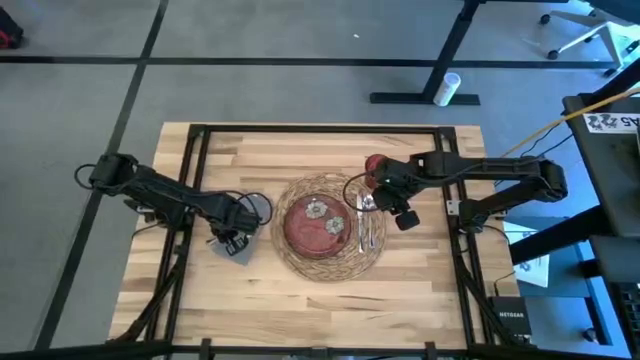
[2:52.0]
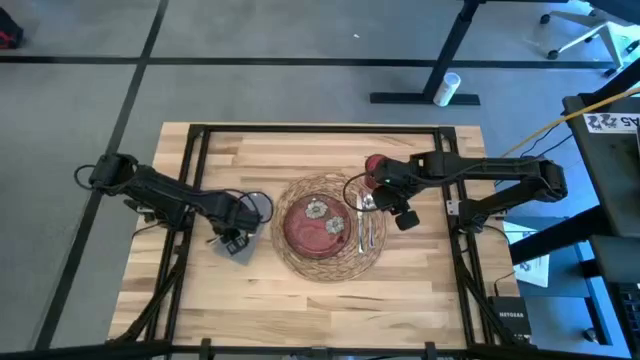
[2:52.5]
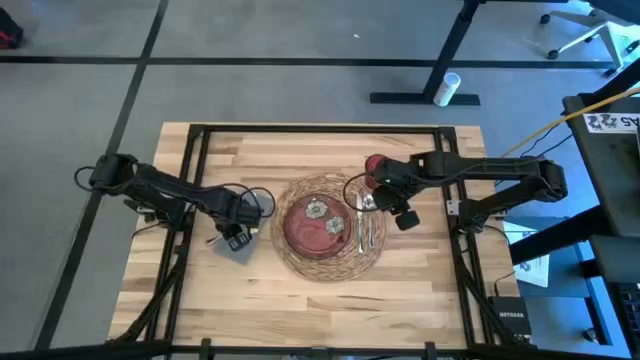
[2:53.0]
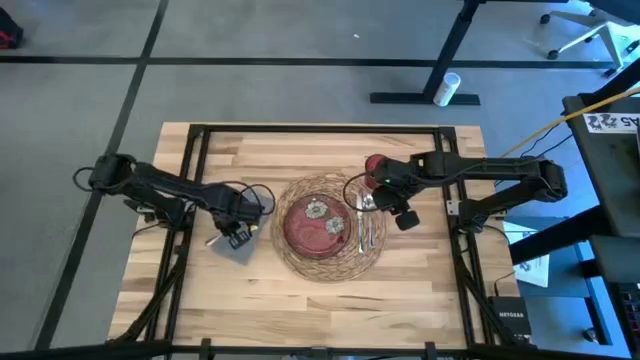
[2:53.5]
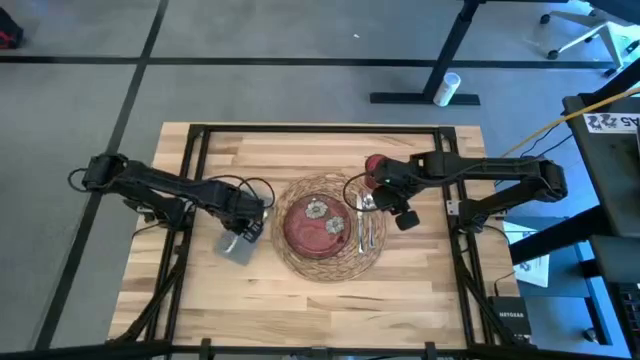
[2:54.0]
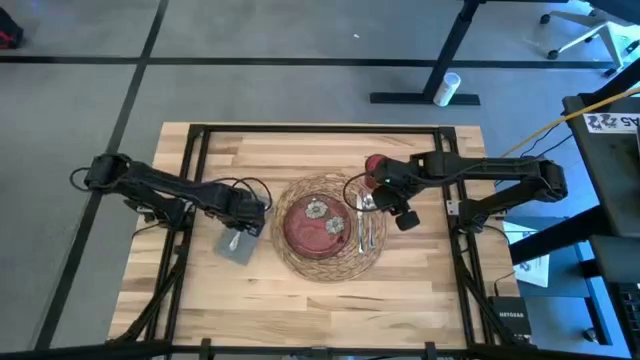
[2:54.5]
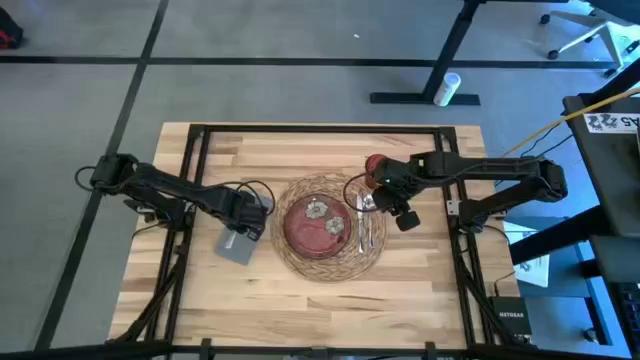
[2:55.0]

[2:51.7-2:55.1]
Task: Set table place
Adjust the silver spoon on the gray table napkin

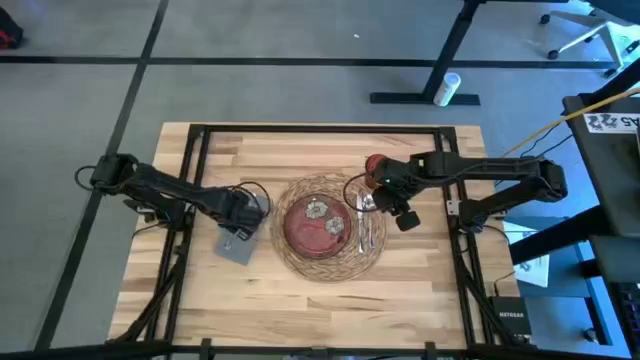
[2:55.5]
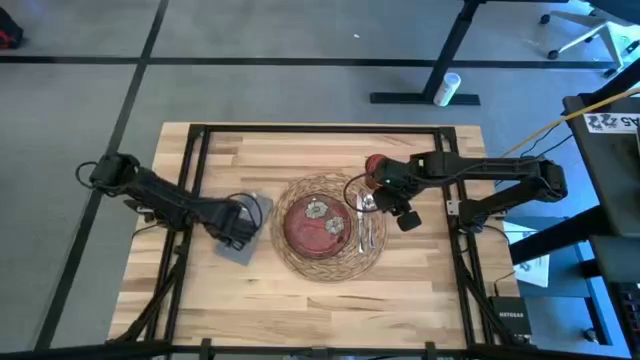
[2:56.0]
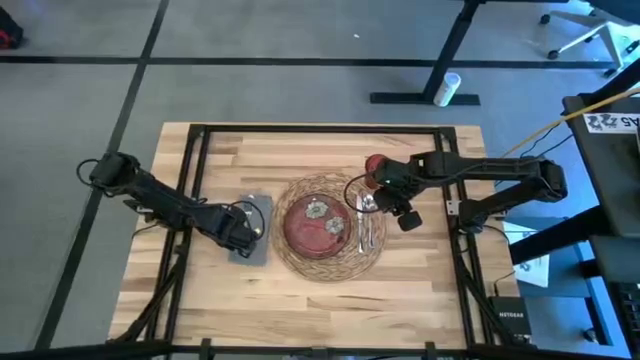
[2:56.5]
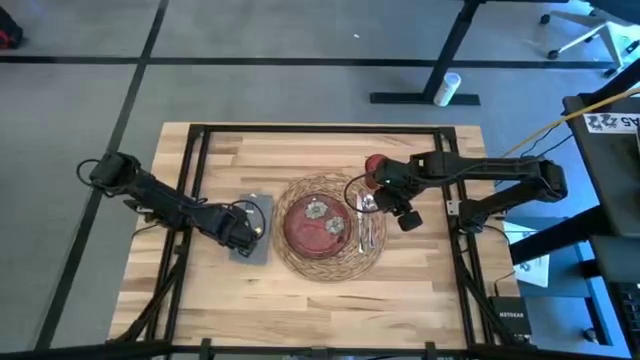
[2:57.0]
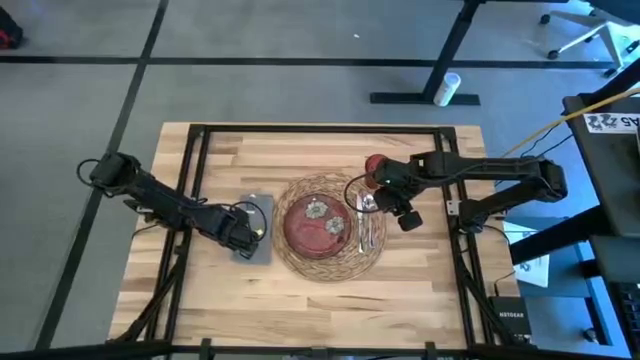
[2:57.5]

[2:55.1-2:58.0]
Adjust the gray table napkin

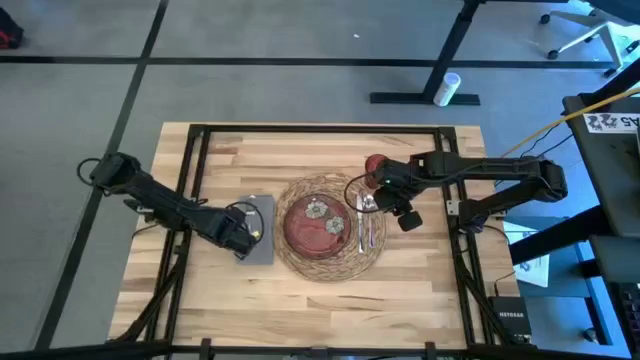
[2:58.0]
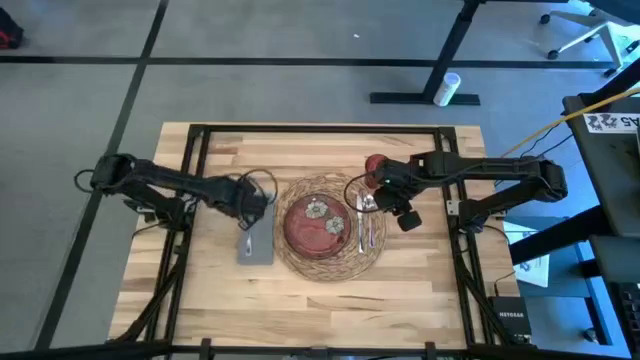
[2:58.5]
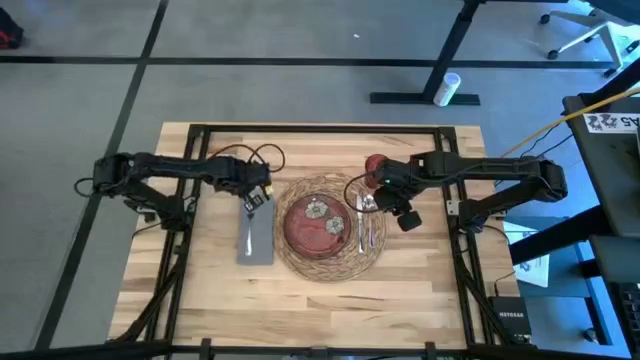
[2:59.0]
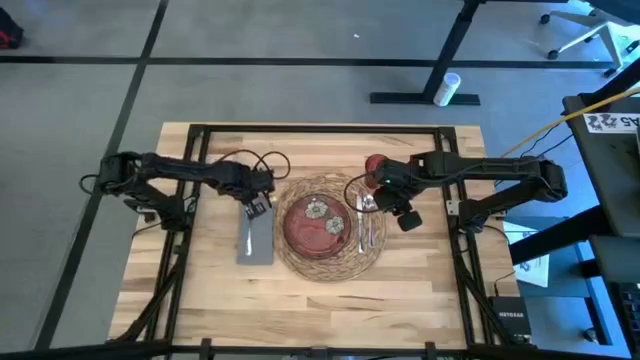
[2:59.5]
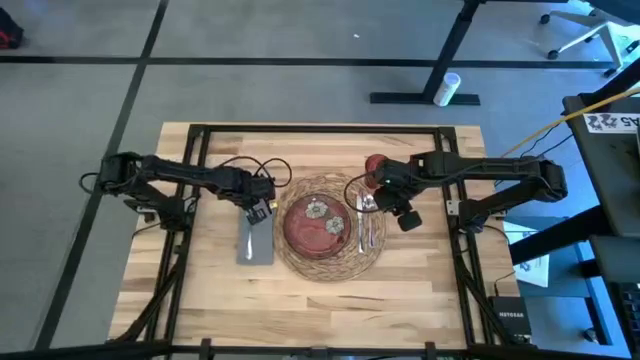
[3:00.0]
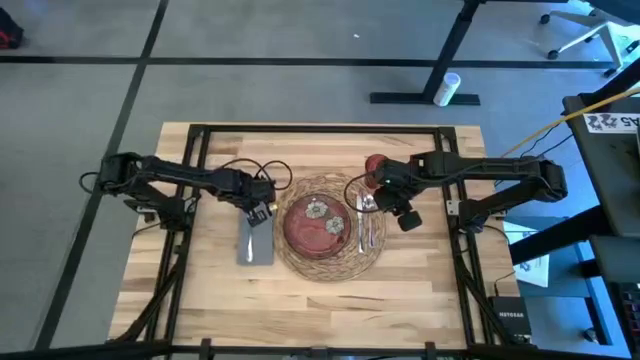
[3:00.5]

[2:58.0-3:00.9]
Adjust the silver fork on the gray table napkin

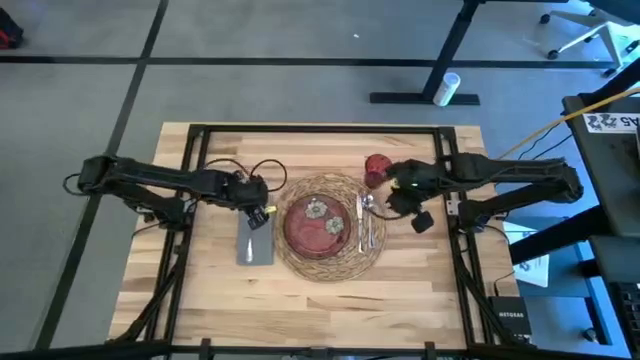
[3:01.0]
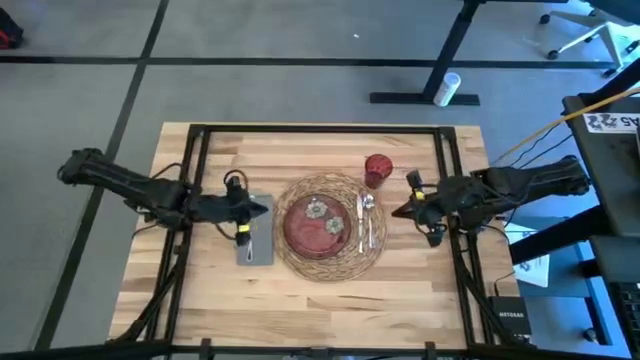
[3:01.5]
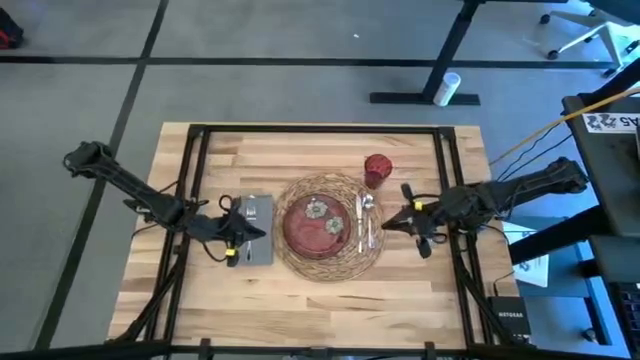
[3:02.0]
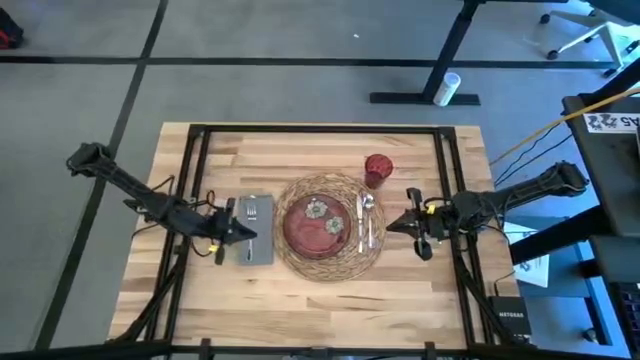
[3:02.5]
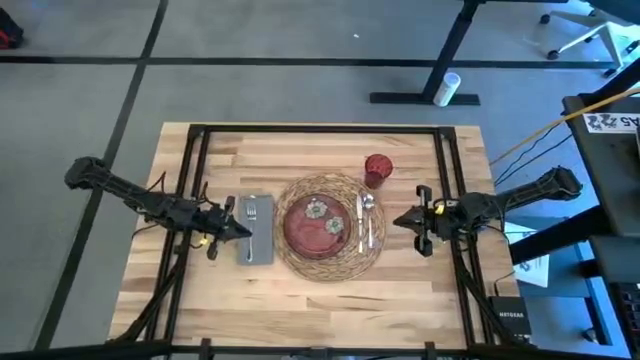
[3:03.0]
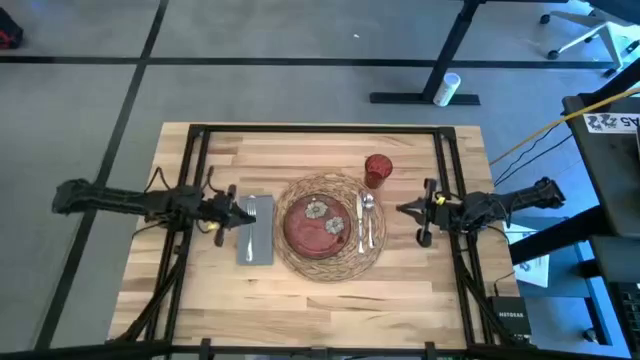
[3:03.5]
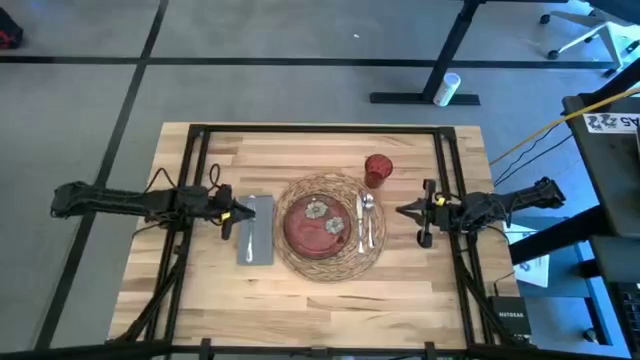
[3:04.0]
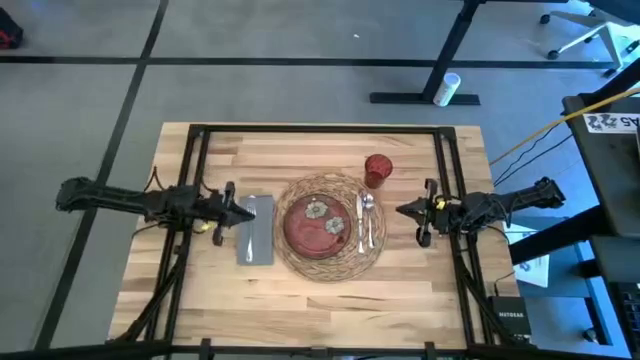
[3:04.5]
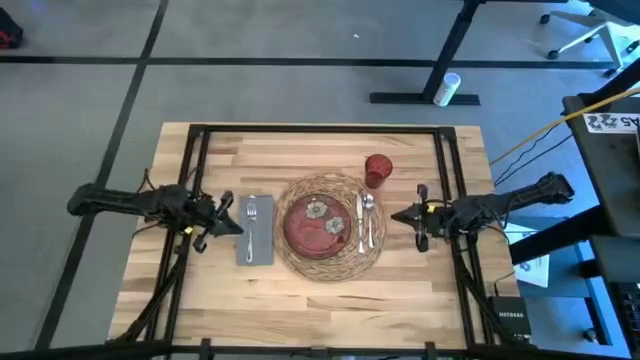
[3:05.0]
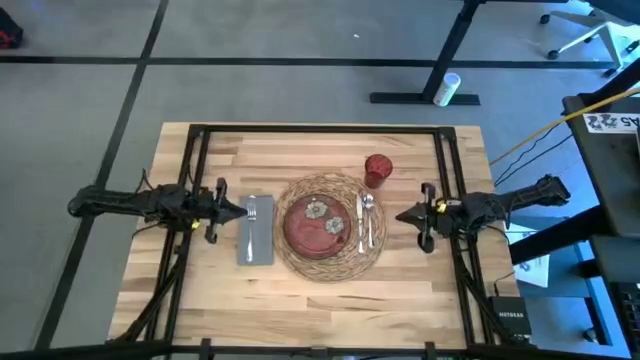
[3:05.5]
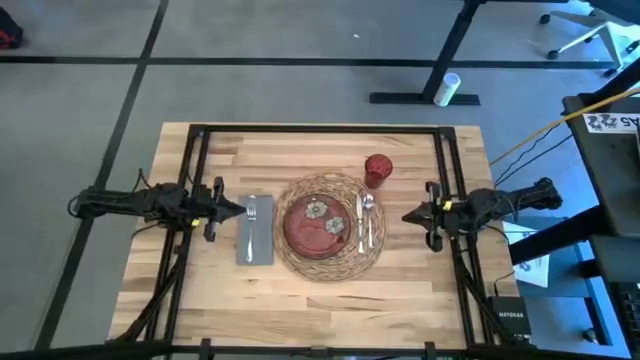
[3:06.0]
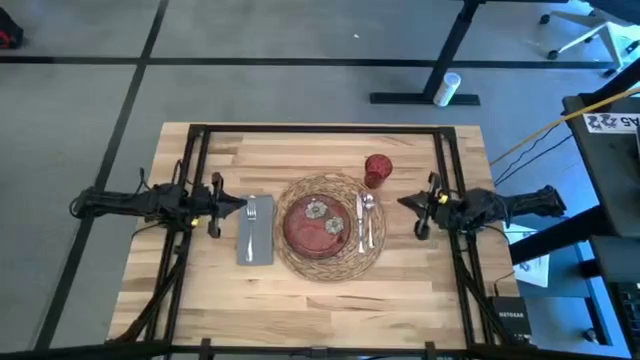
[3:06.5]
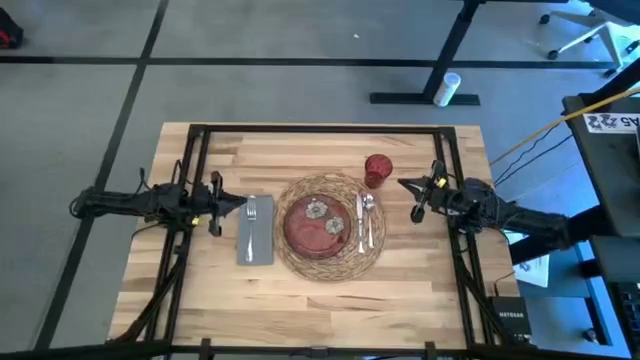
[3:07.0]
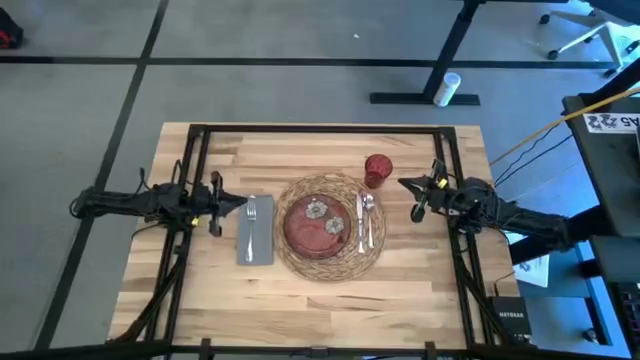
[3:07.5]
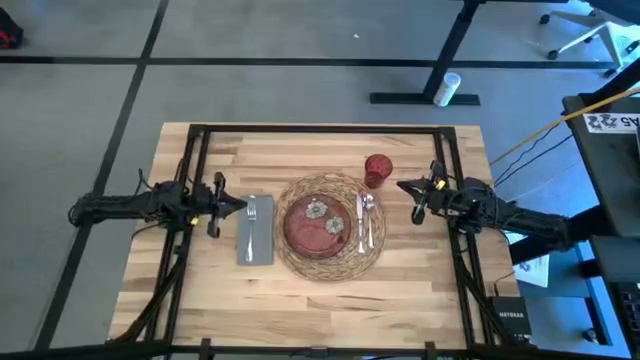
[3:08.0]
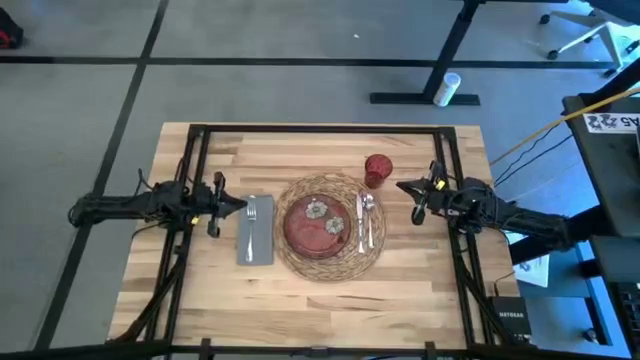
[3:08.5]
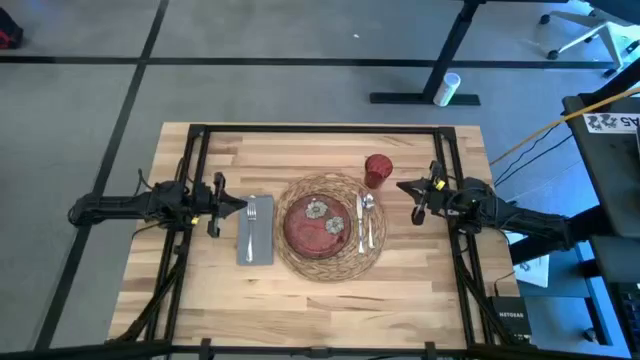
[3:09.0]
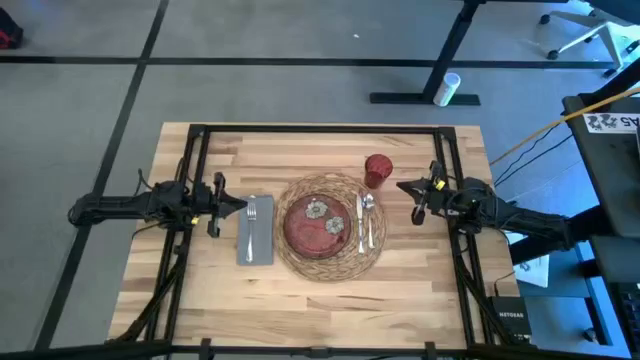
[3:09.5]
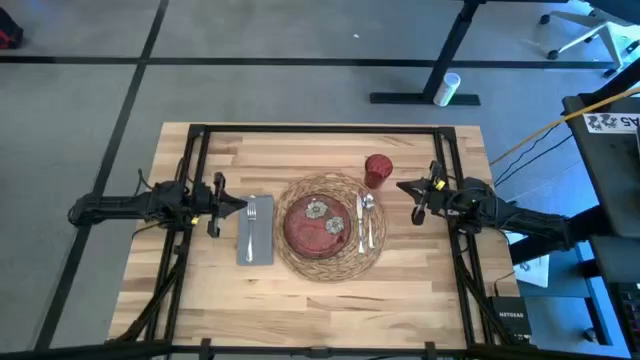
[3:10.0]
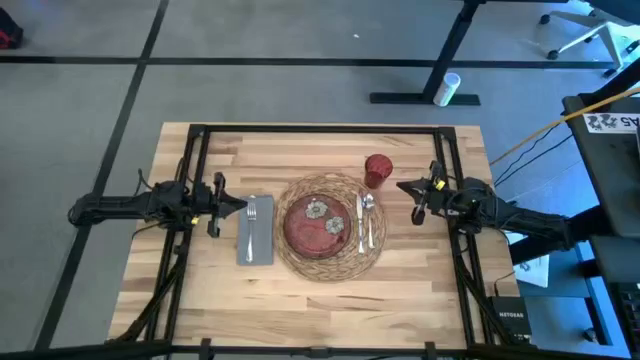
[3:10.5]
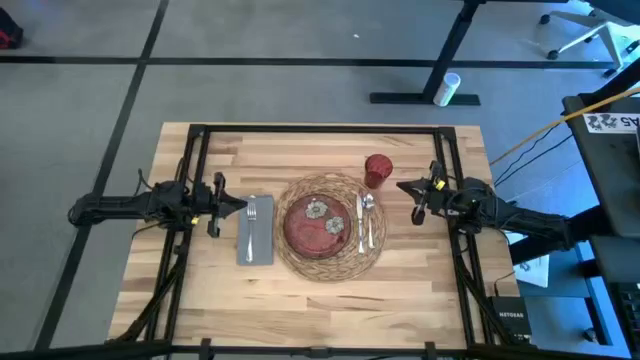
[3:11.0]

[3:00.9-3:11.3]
Return to Home Position
